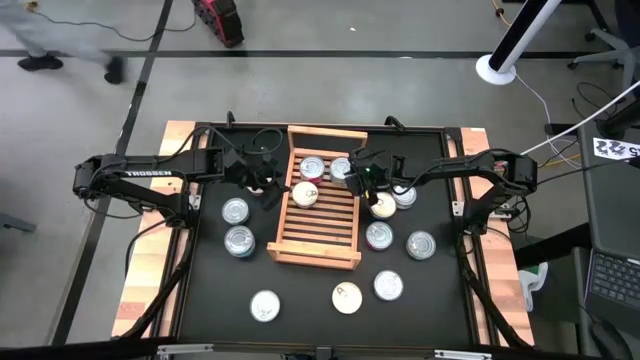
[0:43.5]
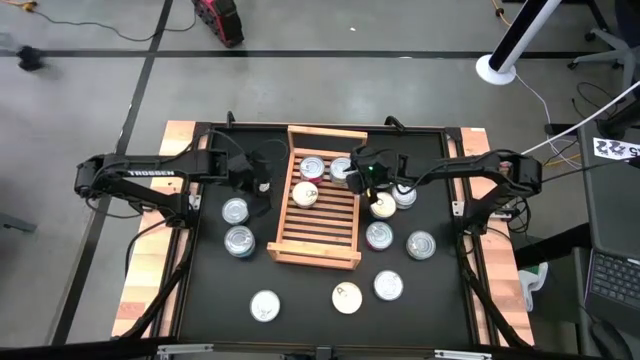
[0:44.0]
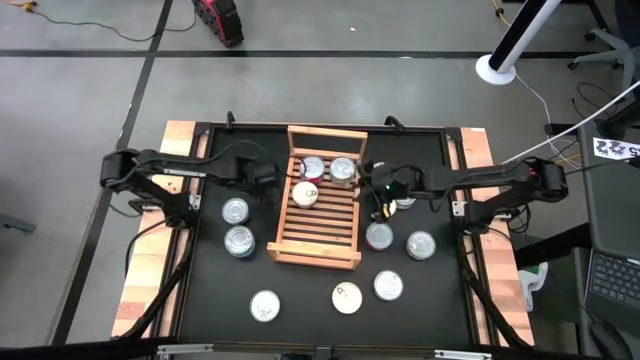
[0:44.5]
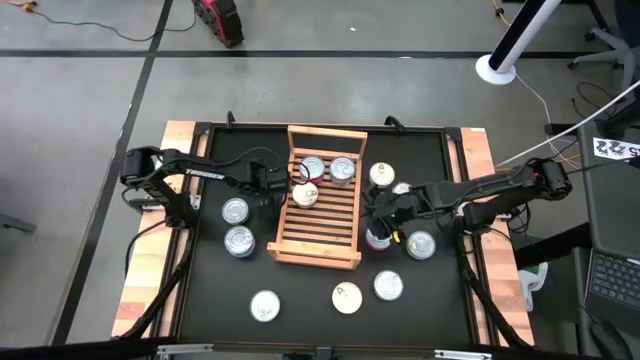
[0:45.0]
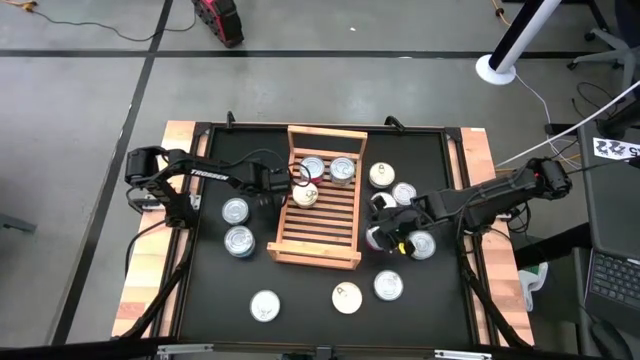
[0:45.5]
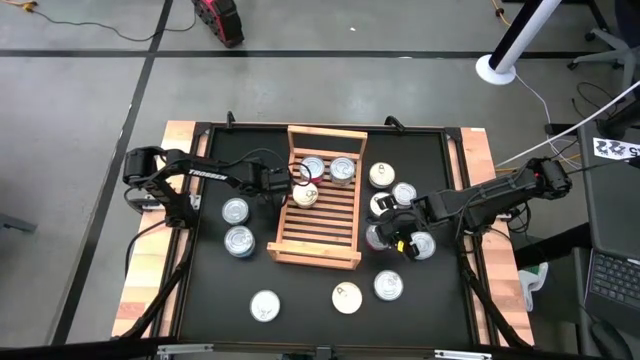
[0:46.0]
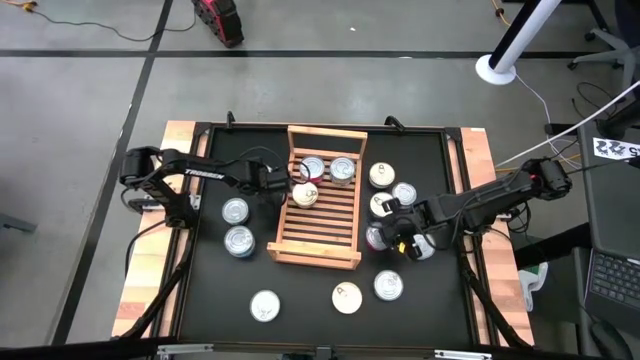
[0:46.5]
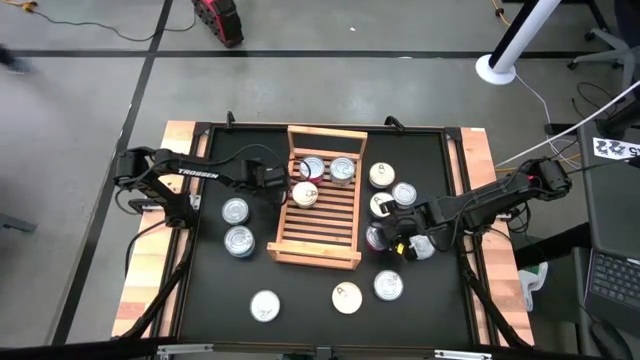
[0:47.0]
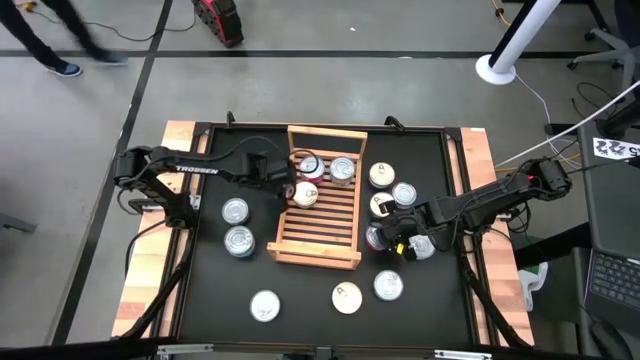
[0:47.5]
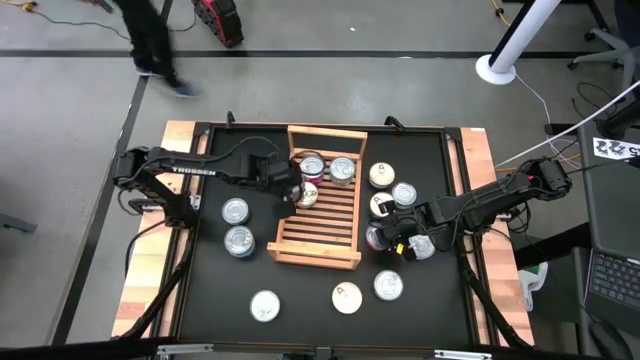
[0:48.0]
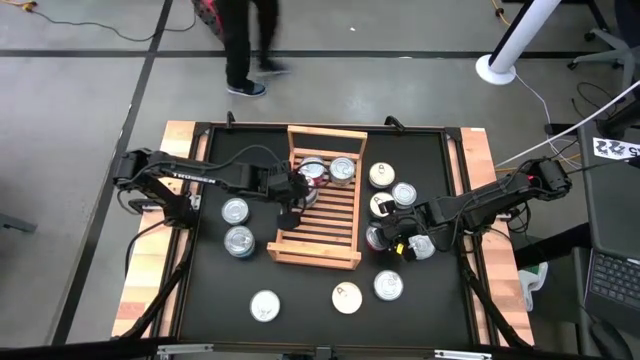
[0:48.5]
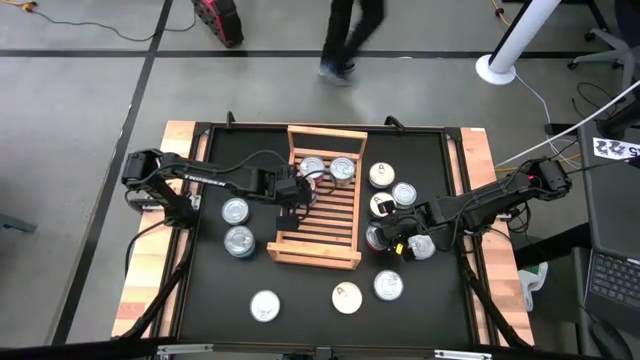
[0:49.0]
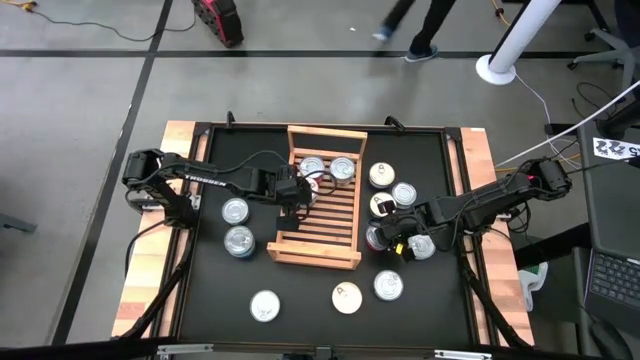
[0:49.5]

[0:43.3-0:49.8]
Task: Stack canned seafood by type on shelf
Stack the blue-pink tuna can on top of the other blue-pink tuna can on the shelf

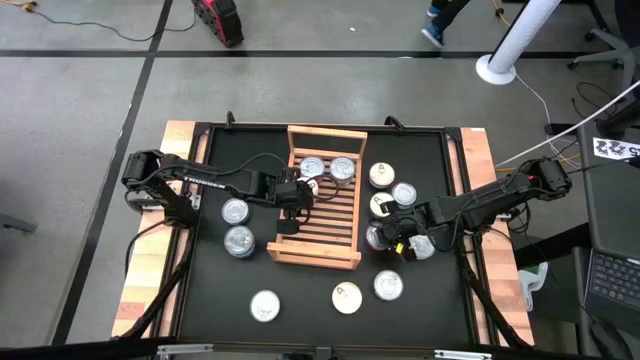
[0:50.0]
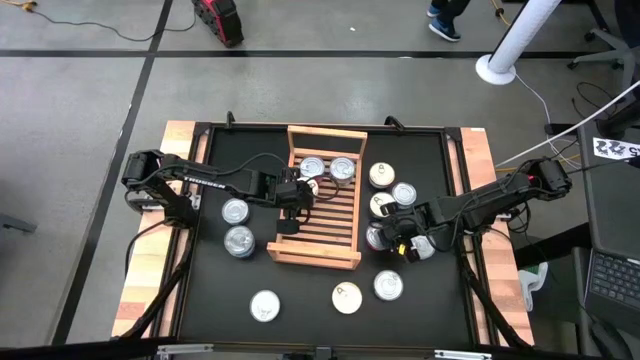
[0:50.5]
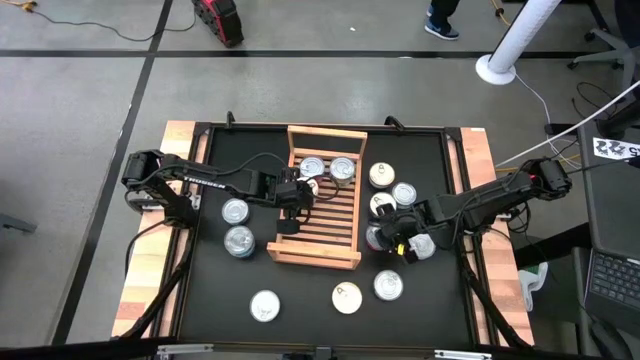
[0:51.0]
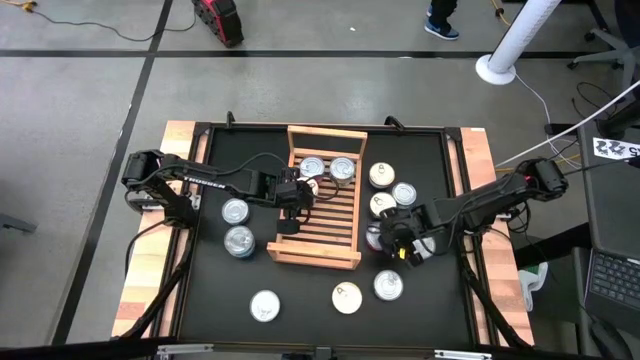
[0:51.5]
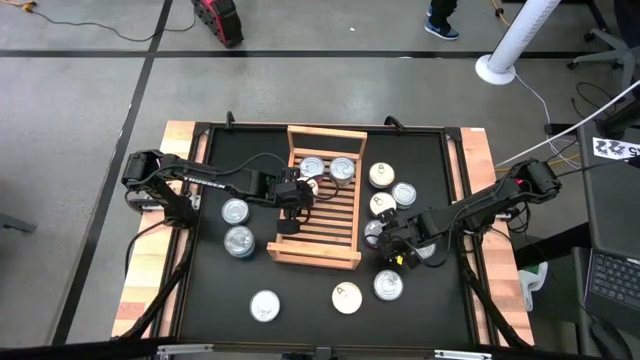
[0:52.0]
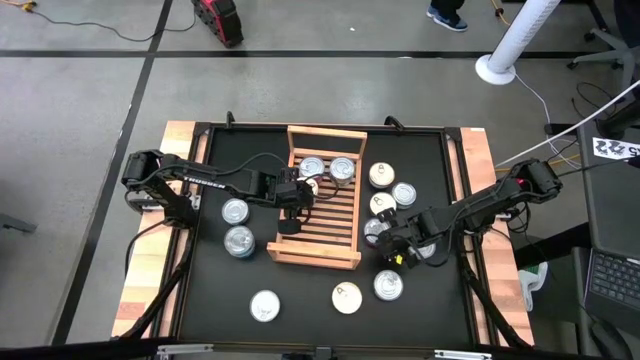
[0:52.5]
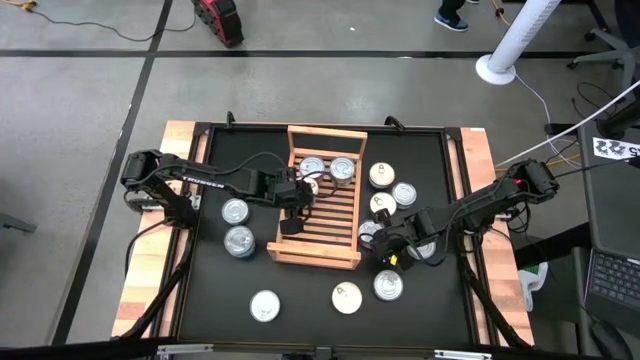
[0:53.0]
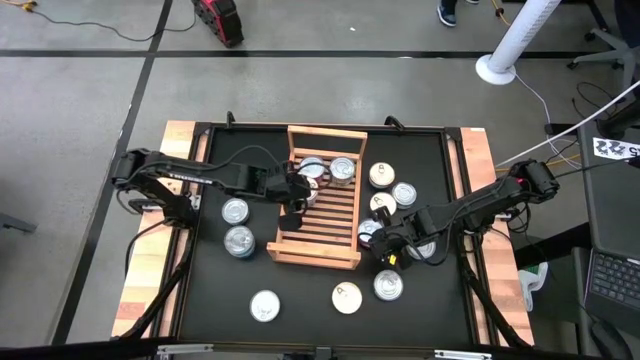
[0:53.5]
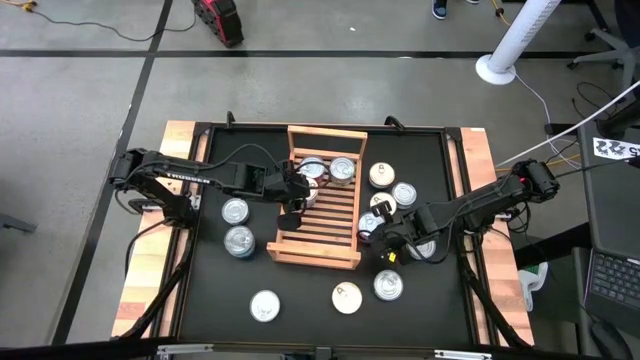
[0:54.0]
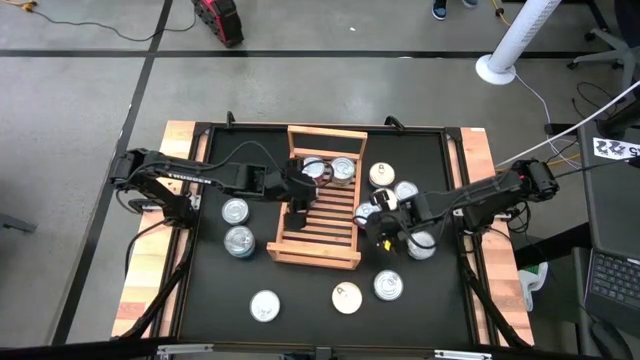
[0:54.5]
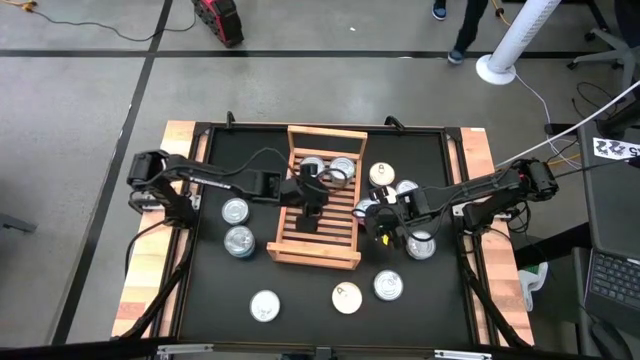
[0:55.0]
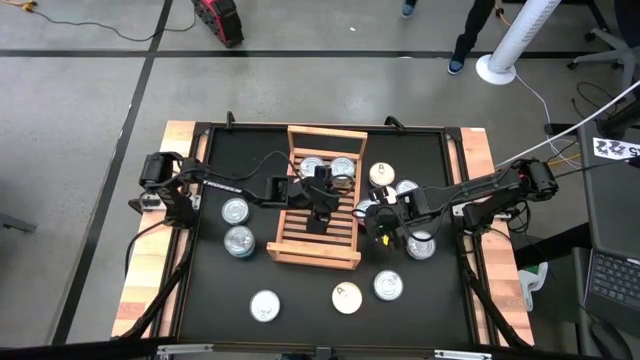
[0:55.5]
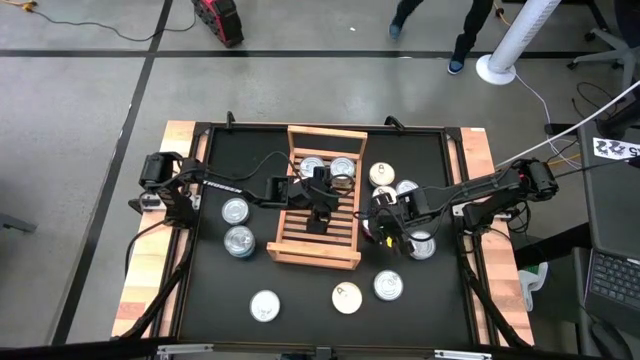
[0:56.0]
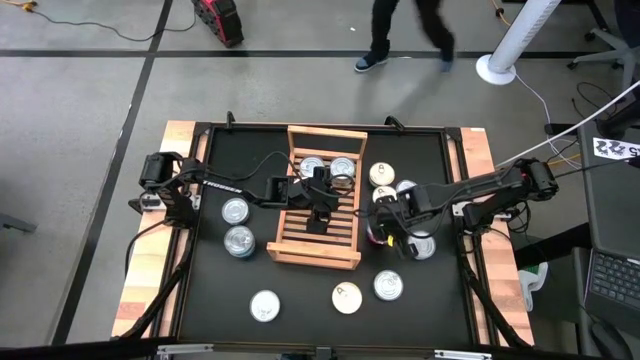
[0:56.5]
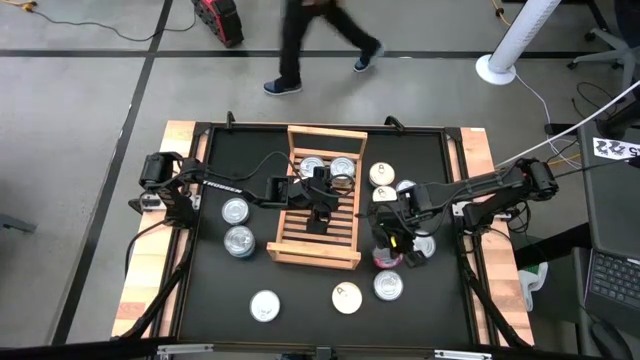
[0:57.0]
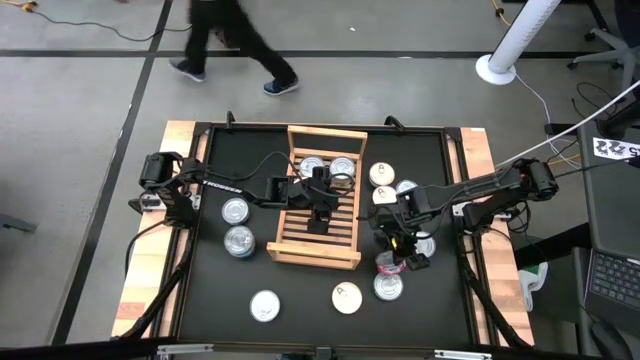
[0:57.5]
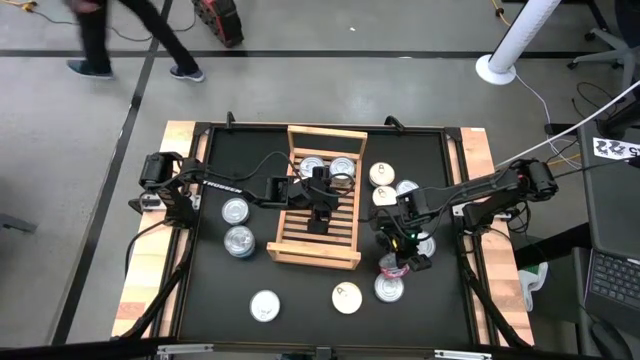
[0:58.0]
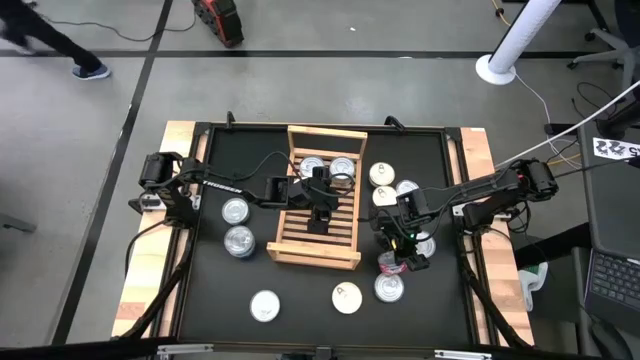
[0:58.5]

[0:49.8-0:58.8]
Stack the red tuna can on top of the other red tuna cans on the shelf

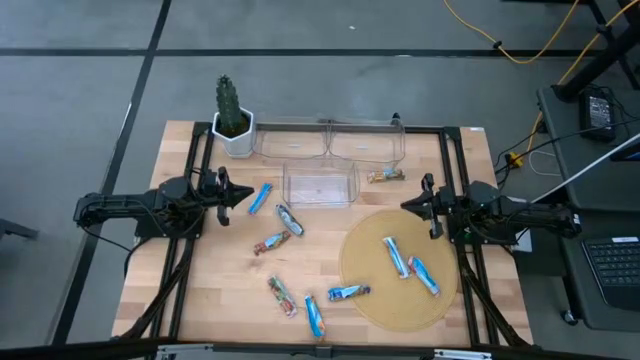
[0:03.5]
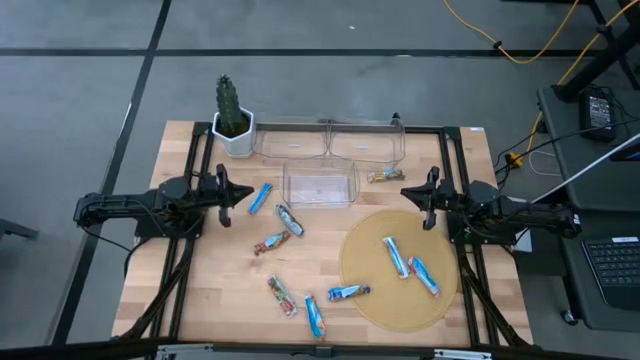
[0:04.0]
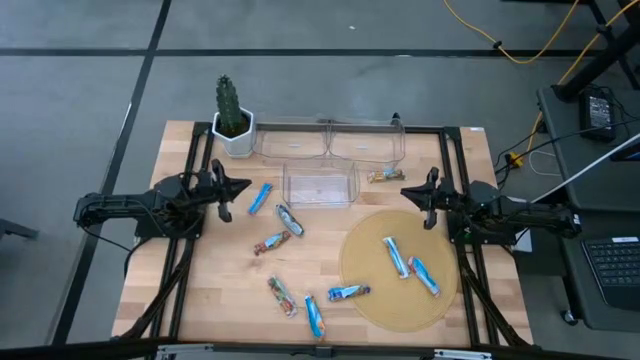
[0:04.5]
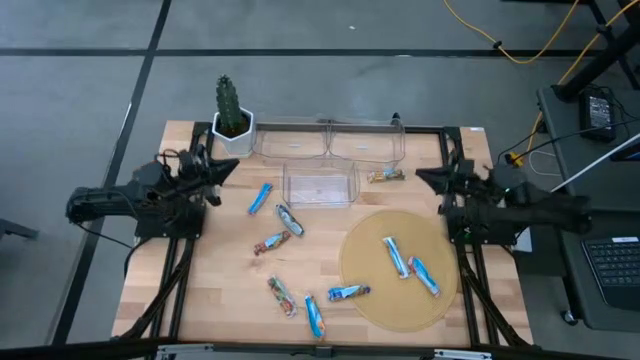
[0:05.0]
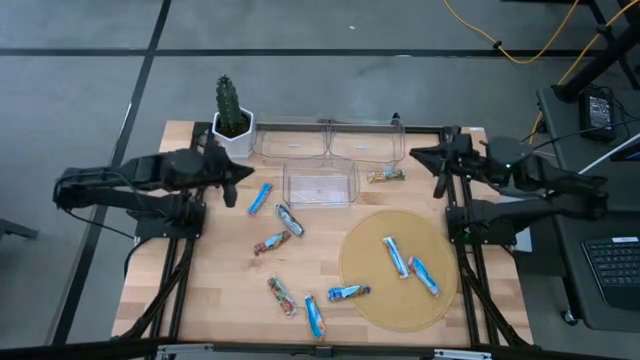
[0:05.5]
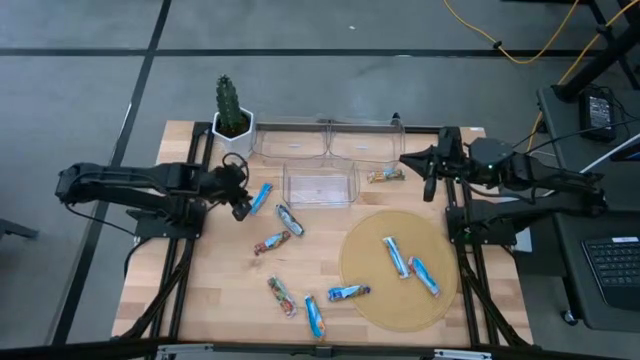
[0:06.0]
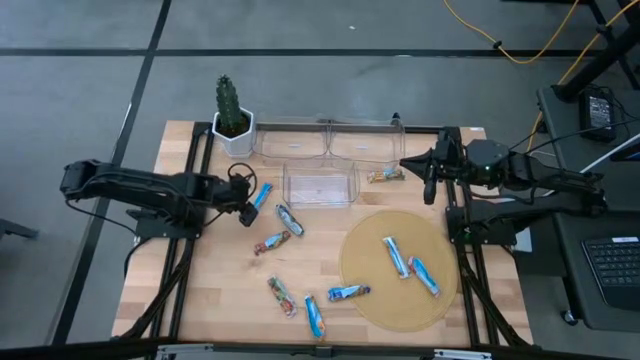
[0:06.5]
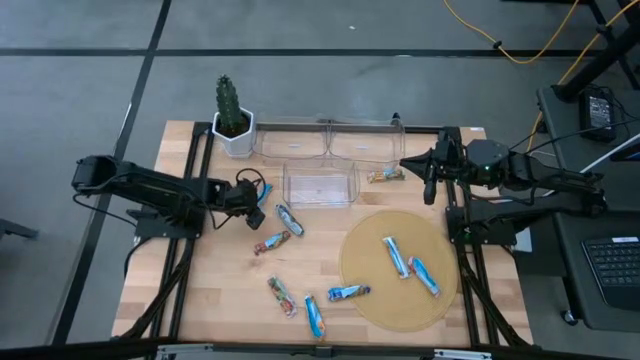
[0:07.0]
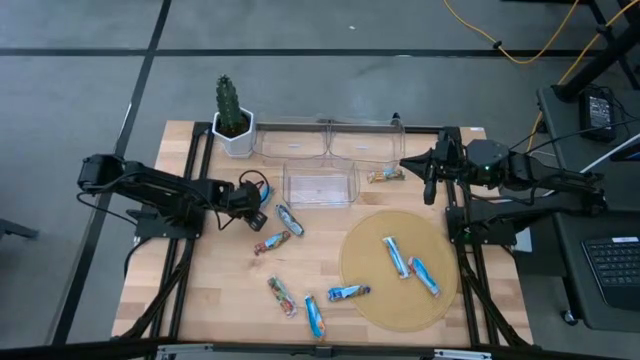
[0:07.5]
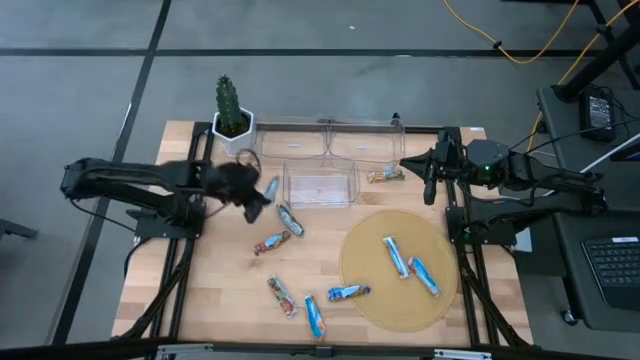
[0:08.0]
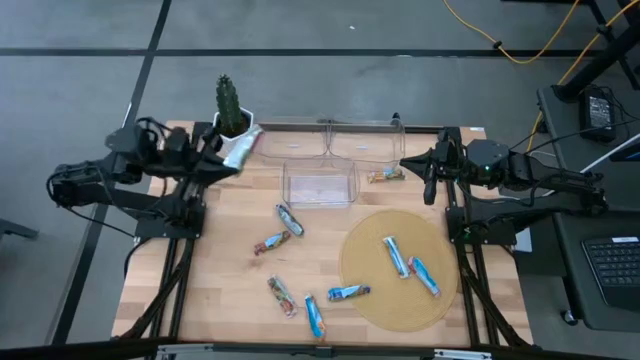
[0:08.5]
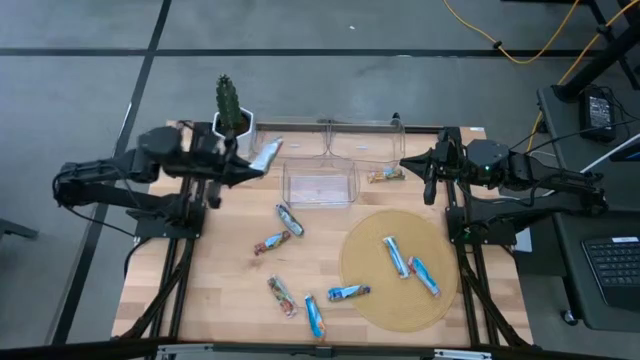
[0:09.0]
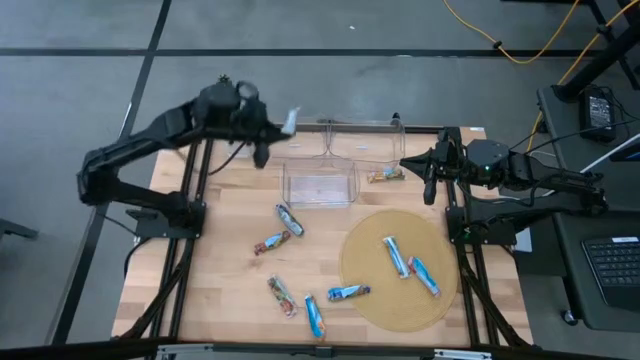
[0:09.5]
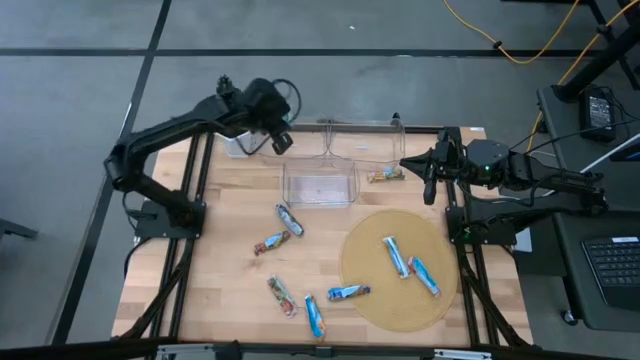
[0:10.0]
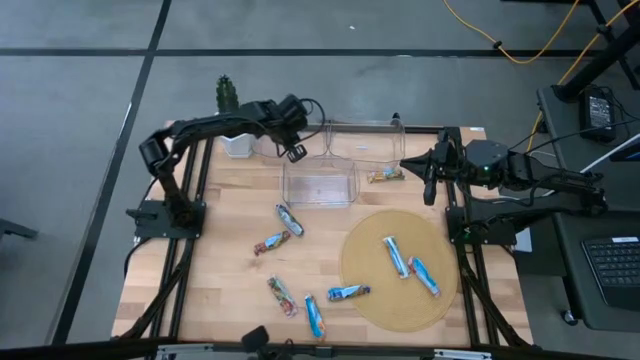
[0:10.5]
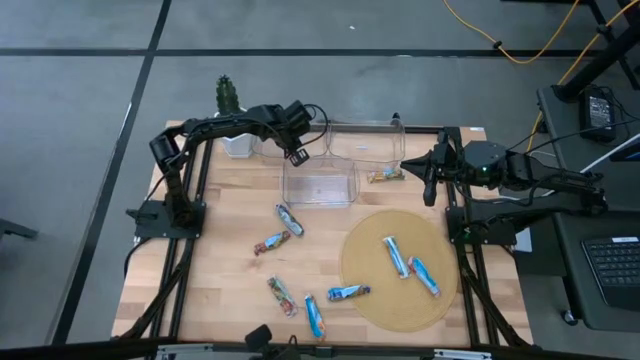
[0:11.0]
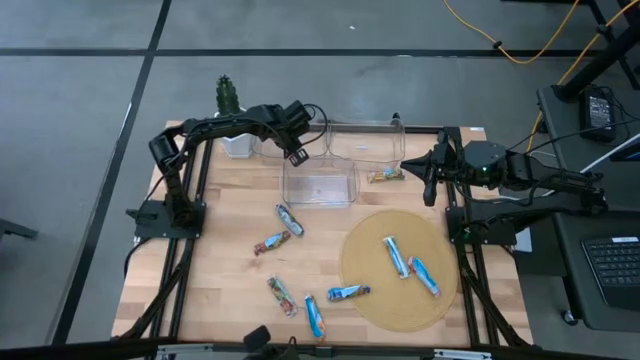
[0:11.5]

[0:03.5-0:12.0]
Task: Pick and place Granola Bars by type
Put the red granola bar into the top left transparent bin
